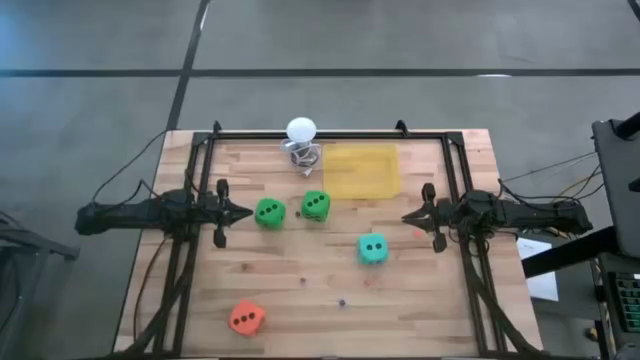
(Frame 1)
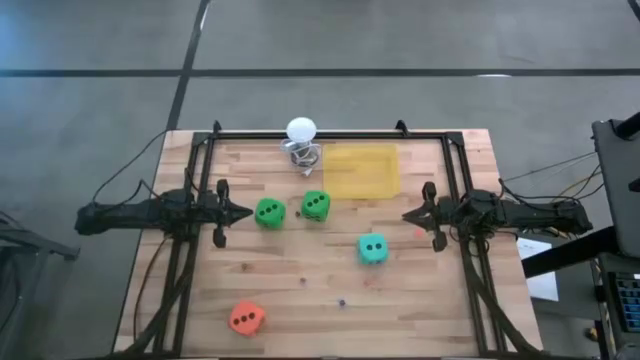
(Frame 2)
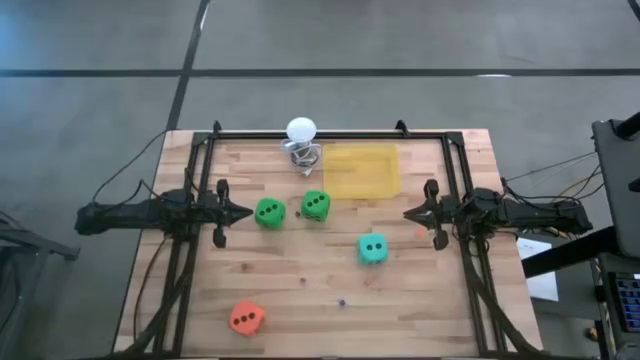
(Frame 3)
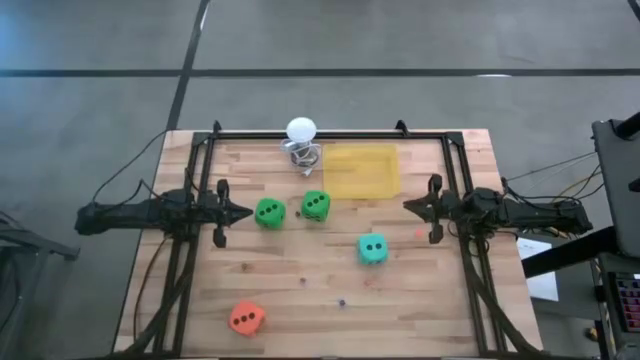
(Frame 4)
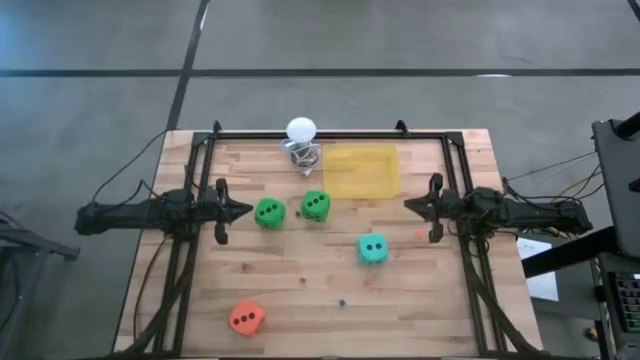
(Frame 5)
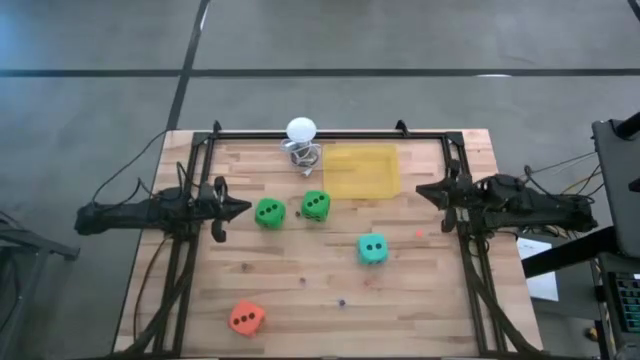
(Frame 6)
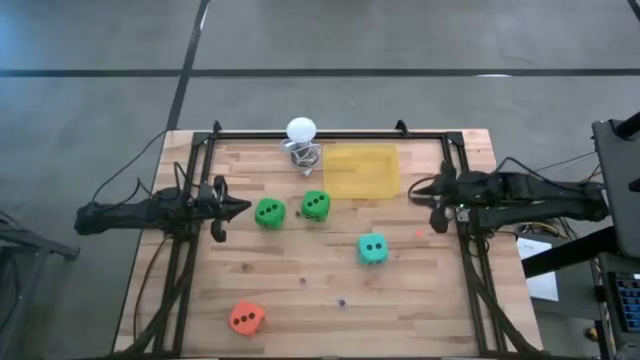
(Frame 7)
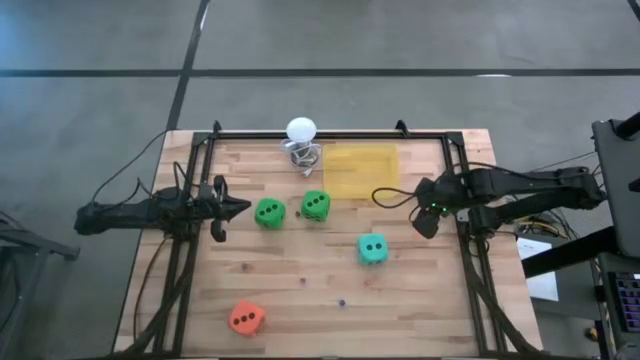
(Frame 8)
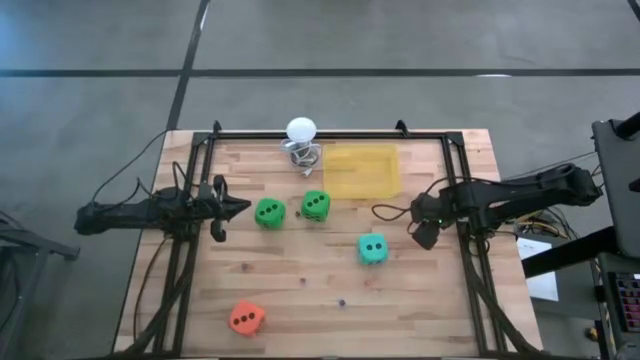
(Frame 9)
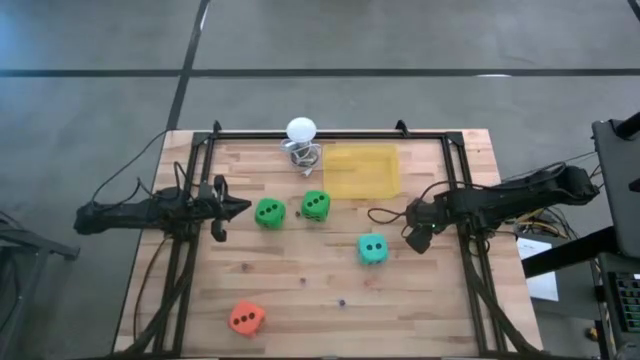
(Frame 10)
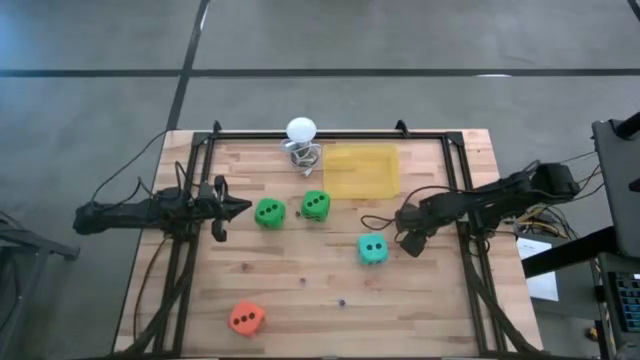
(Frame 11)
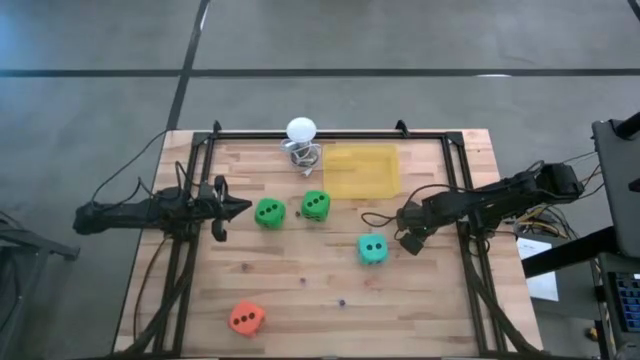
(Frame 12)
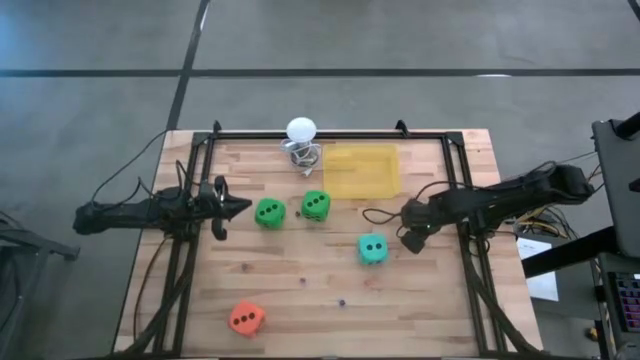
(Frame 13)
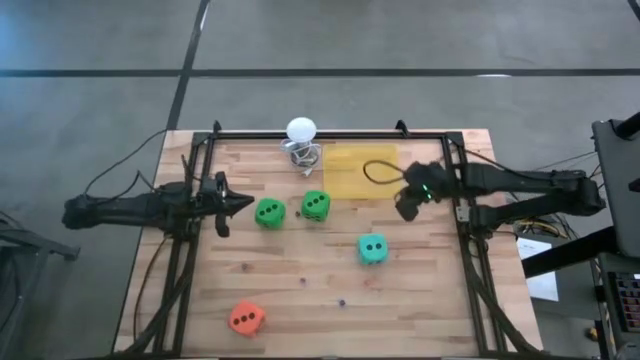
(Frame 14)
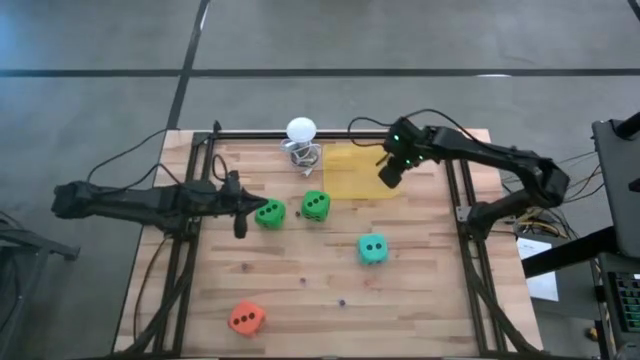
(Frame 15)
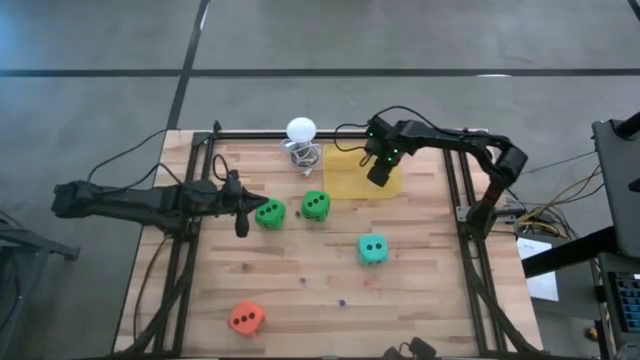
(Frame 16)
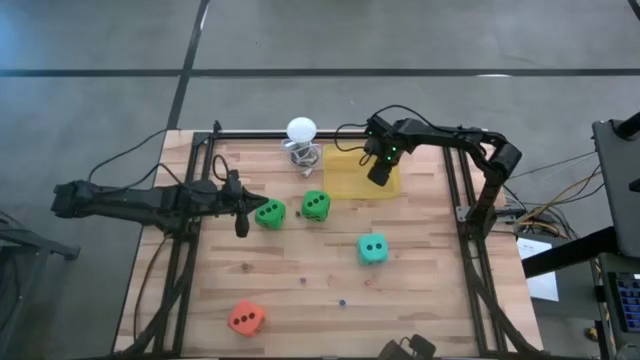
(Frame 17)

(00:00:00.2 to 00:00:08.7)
Task: Pick & Place Dice
Put the small orange dice into the yellow bin

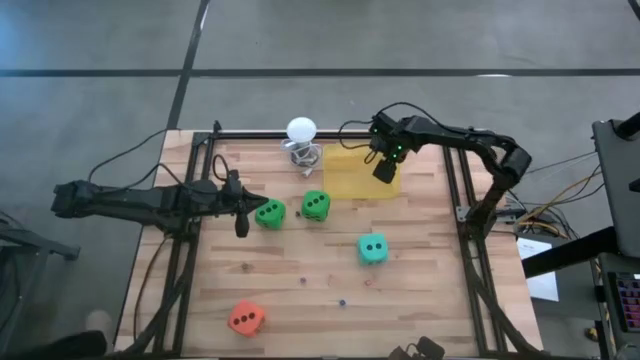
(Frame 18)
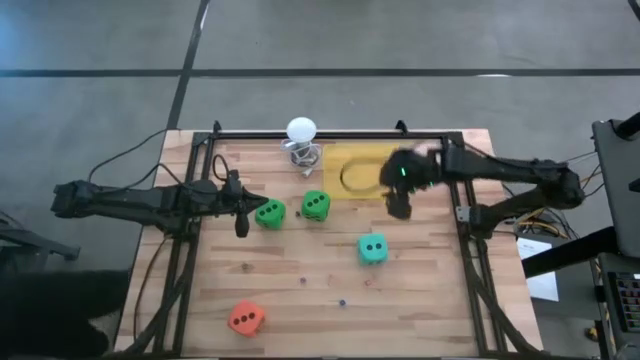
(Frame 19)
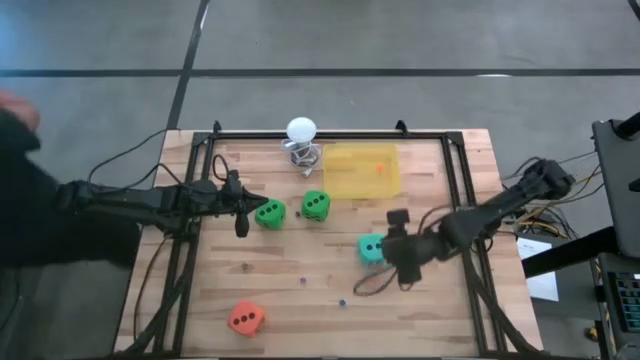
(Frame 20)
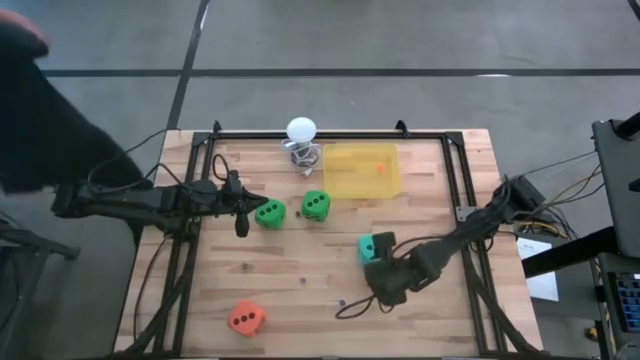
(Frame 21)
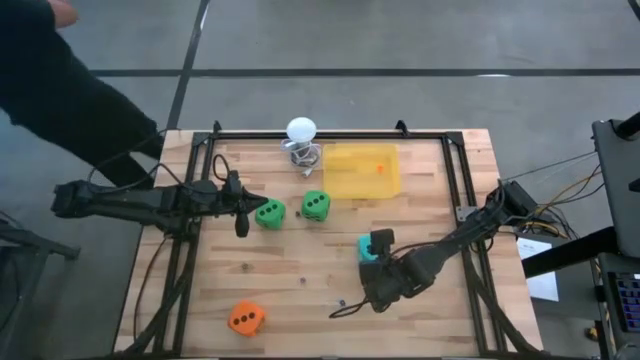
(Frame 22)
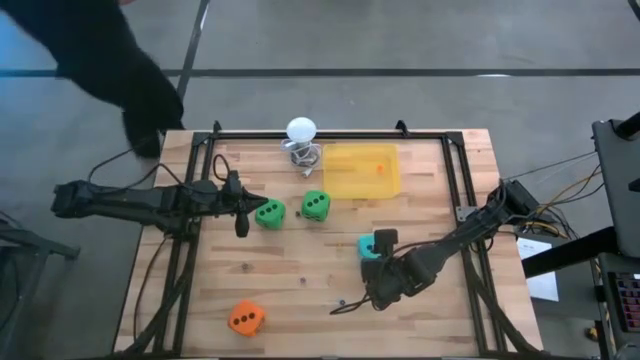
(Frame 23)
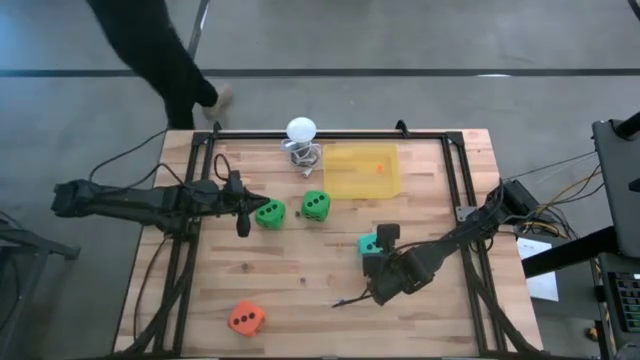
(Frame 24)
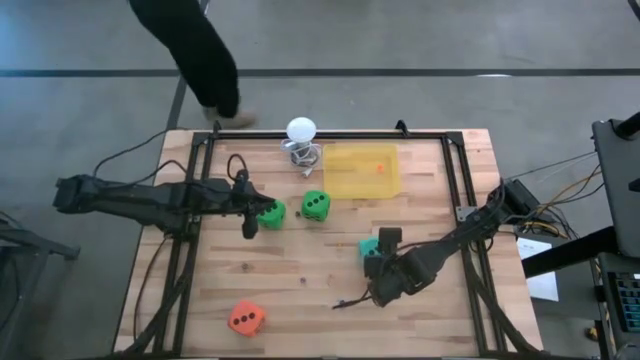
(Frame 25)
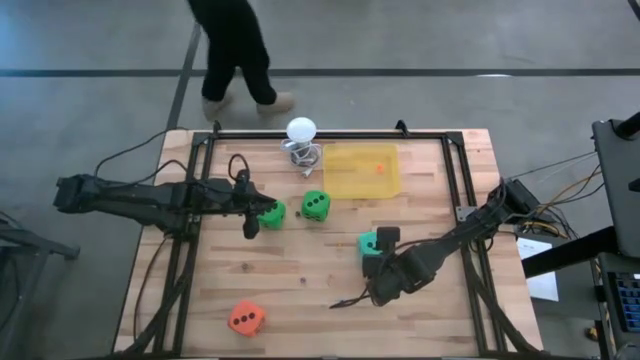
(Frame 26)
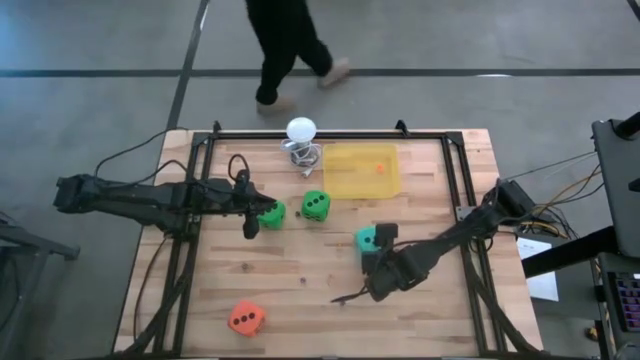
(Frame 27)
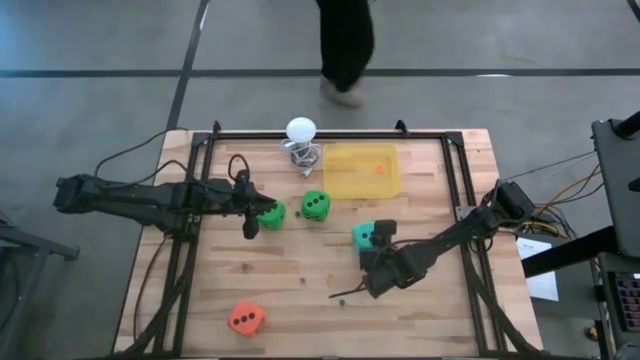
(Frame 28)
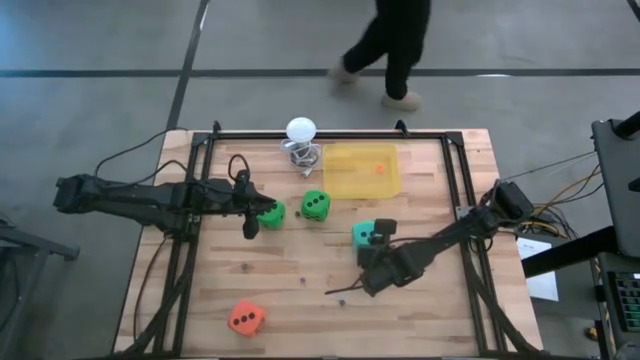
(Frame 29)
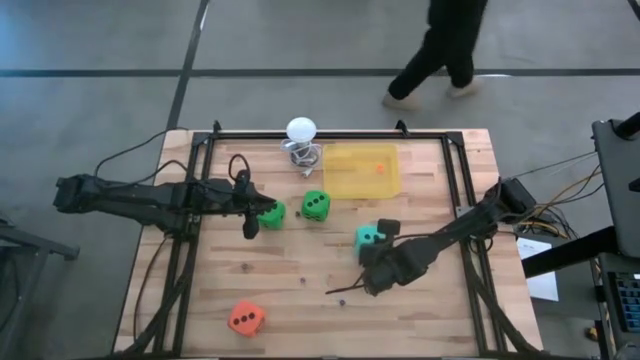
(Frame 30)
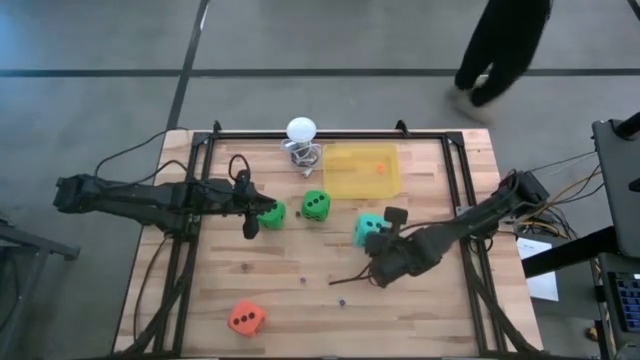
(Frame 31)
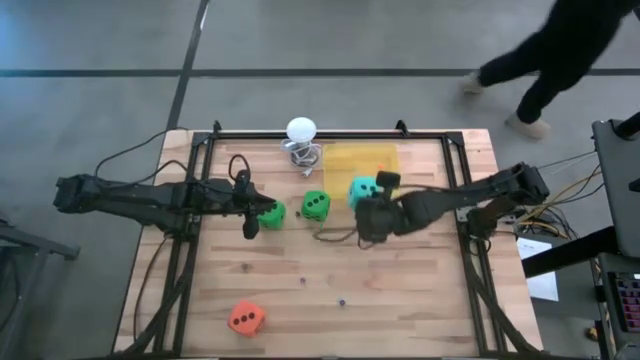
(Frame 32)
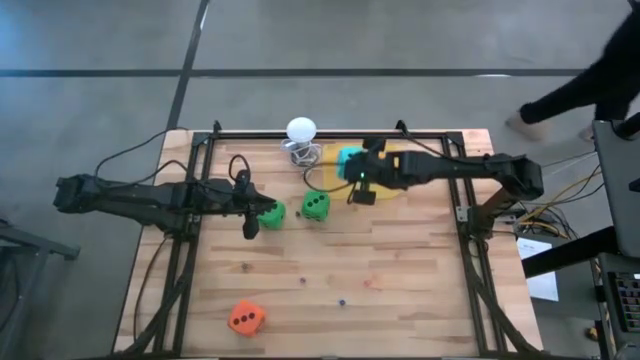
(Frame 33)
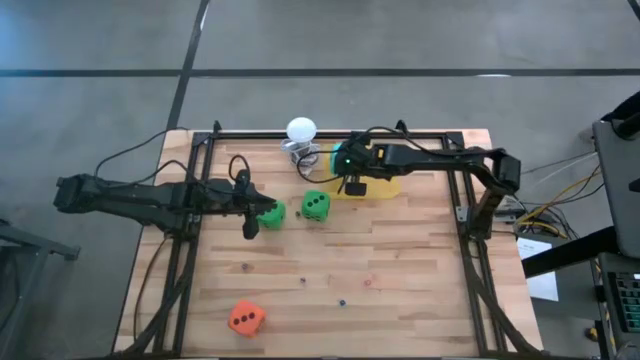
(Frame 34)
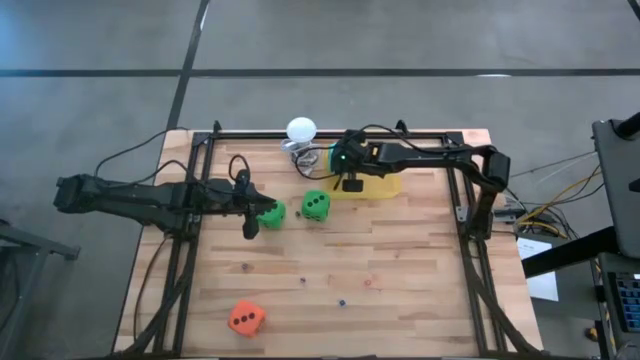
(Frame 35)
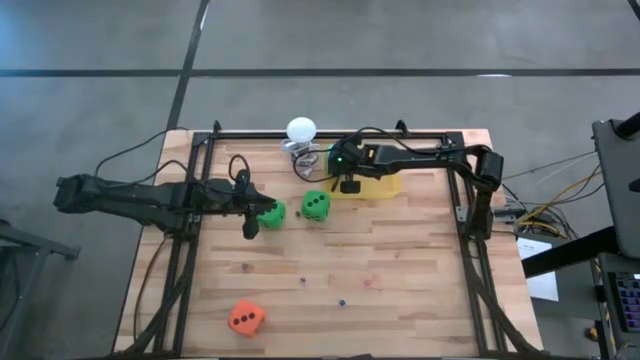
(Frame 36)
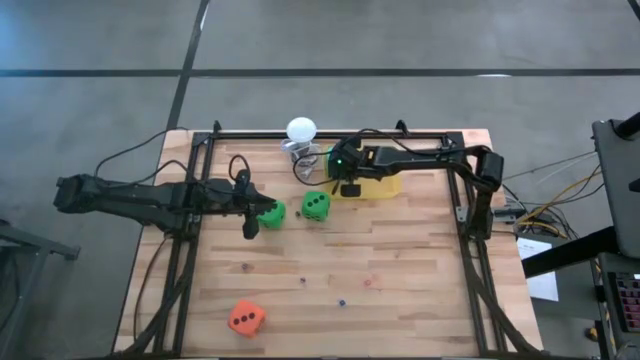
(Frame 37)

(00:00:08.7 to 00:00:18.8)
Put the large blue dice into the yellow bin

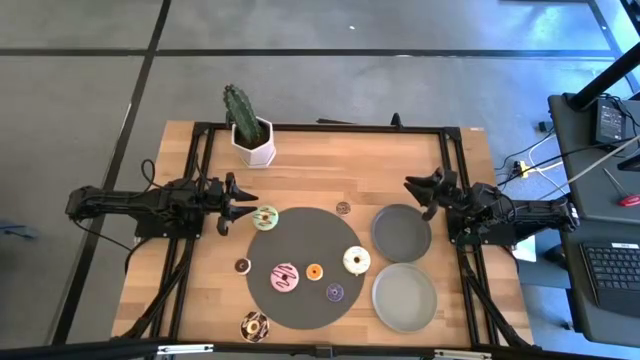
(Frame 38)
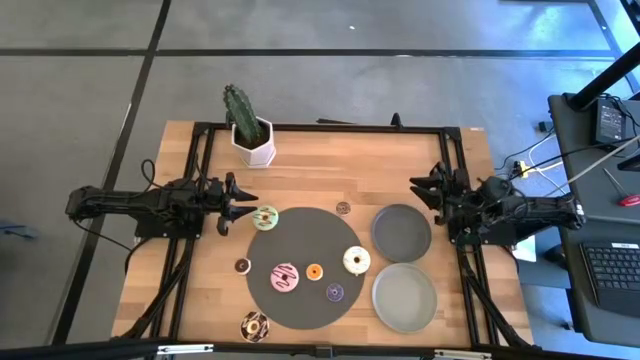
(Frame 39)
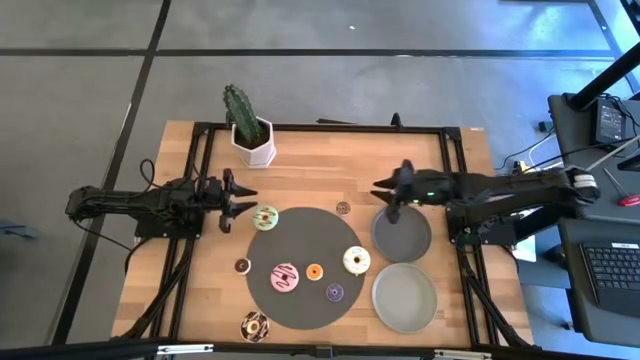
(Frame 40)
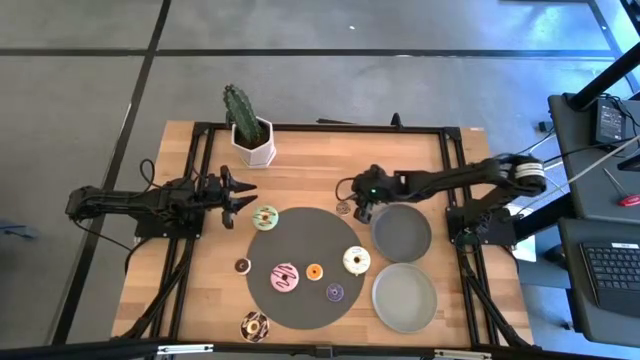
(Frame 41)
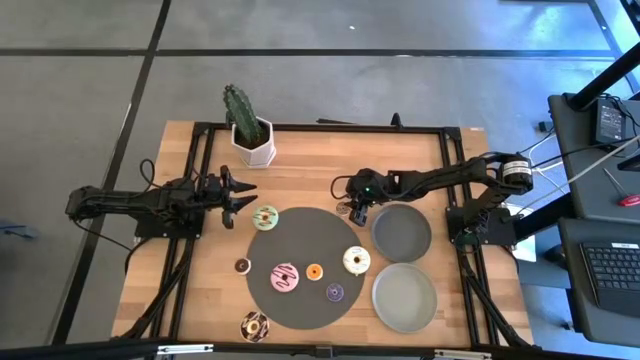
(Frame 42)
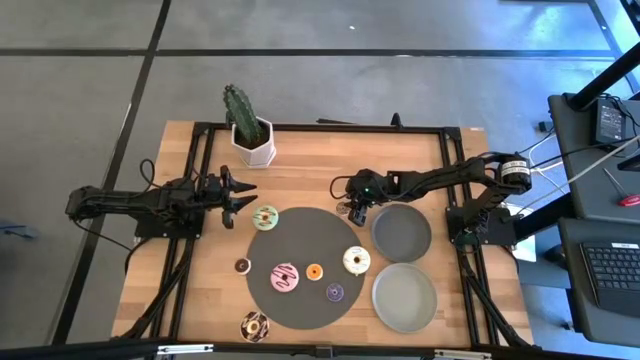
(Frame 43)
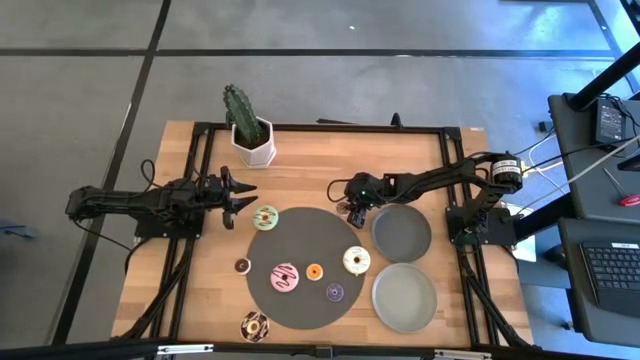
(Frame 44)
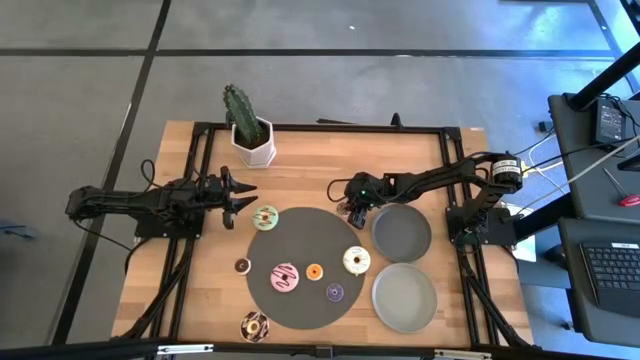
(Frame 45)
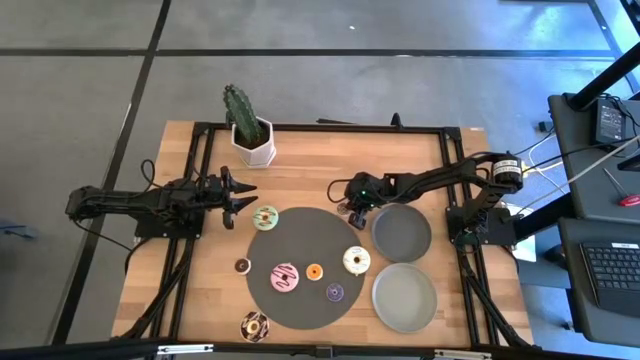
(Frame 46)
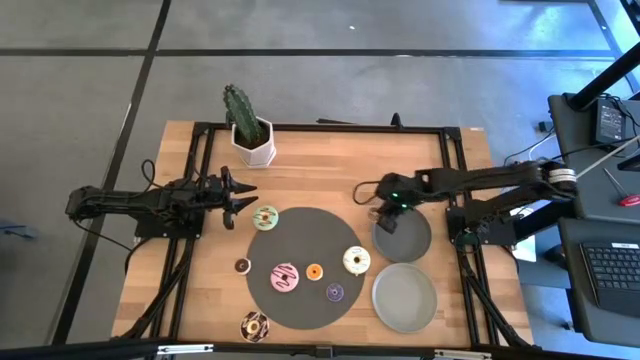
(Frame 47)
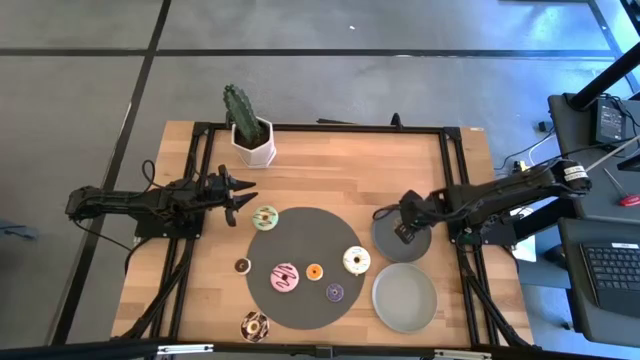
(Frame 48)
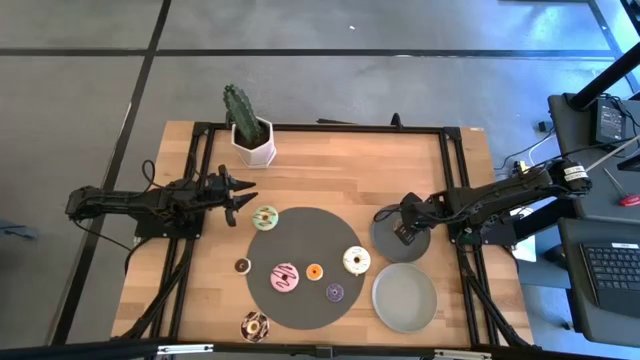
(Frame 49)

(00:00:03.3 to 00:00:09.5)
Task: Pick & Place donuts
Put the small brown donut on the dark gray plate
